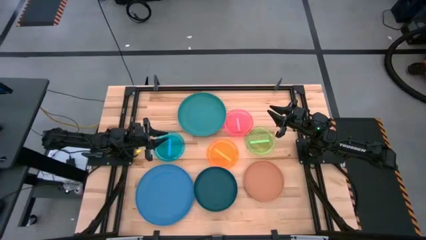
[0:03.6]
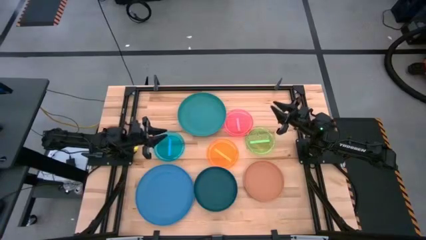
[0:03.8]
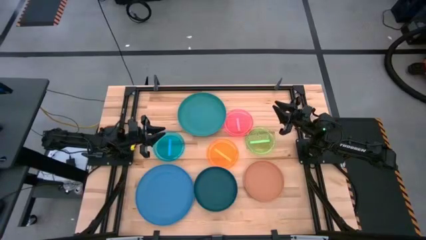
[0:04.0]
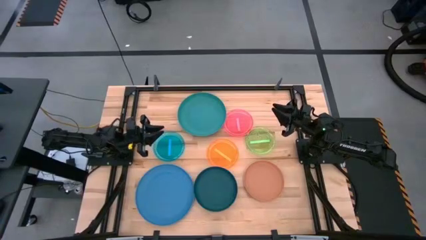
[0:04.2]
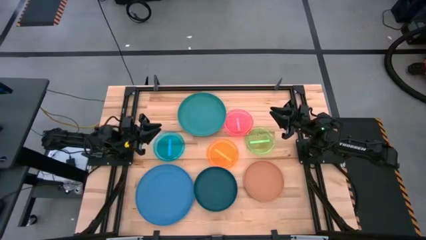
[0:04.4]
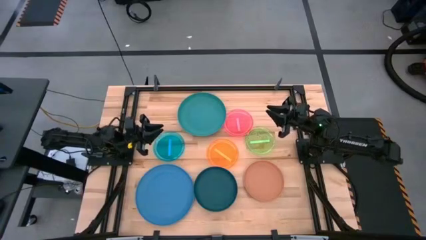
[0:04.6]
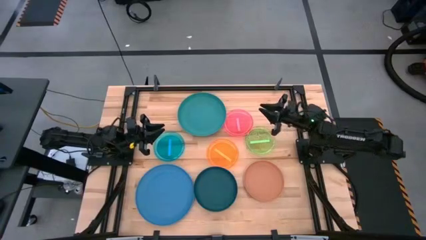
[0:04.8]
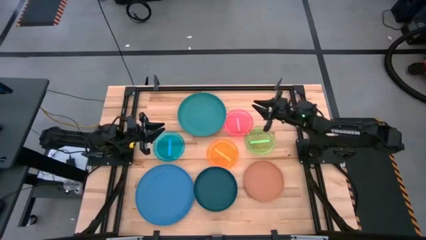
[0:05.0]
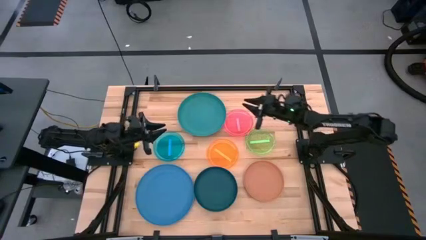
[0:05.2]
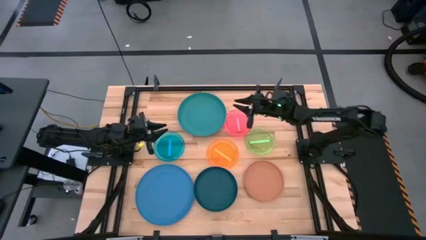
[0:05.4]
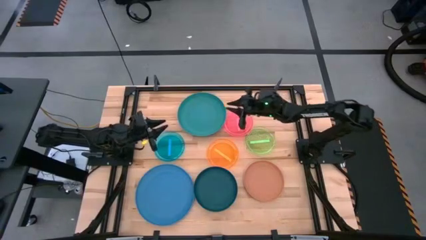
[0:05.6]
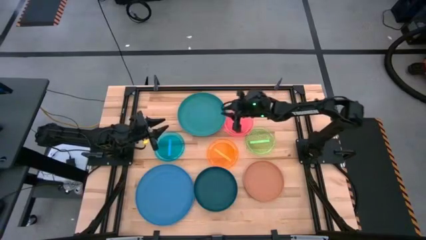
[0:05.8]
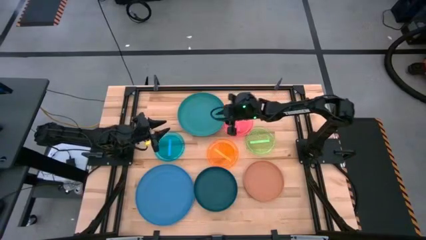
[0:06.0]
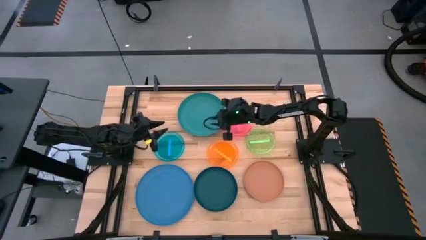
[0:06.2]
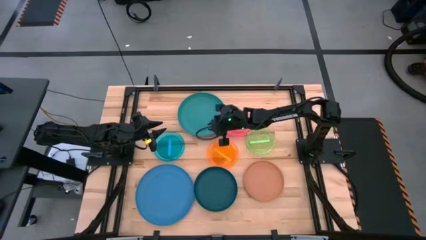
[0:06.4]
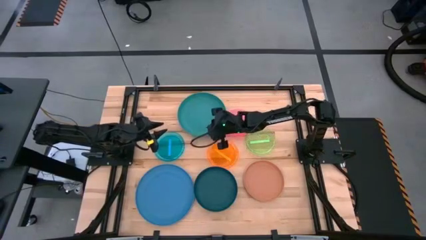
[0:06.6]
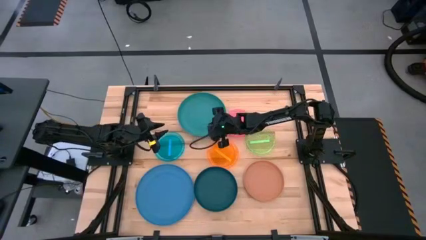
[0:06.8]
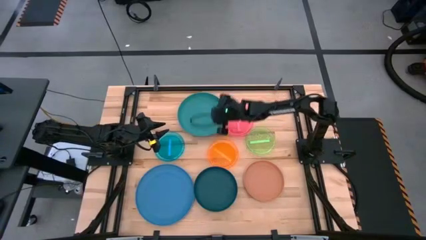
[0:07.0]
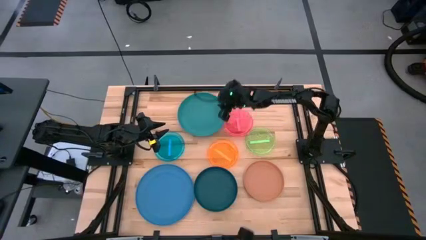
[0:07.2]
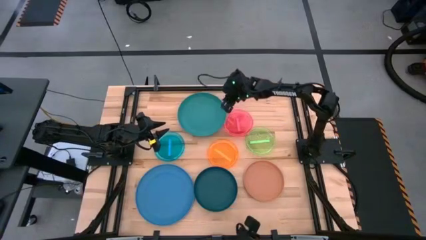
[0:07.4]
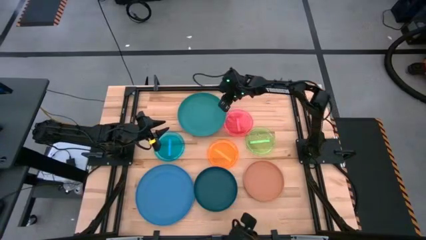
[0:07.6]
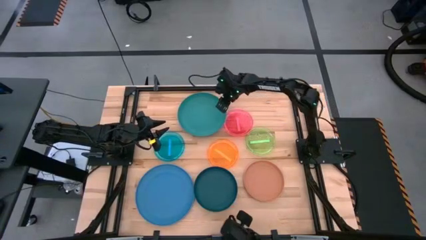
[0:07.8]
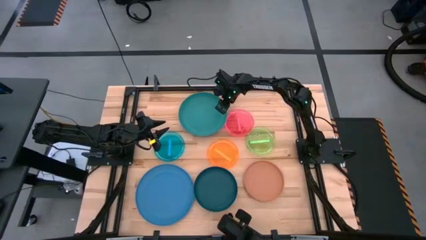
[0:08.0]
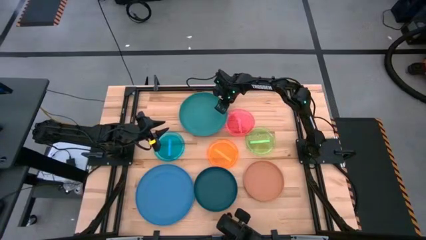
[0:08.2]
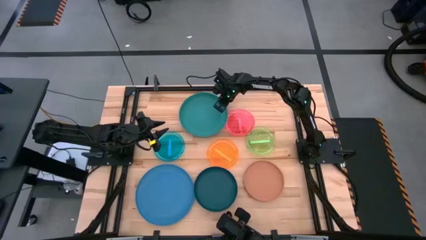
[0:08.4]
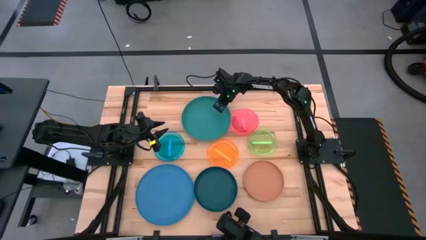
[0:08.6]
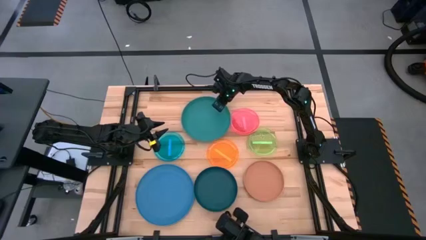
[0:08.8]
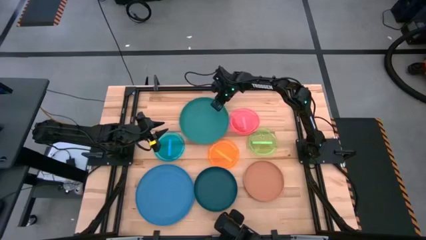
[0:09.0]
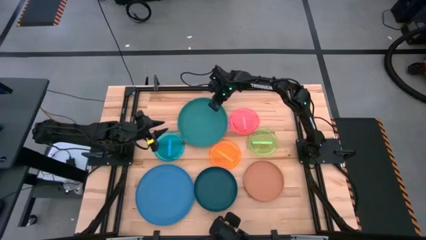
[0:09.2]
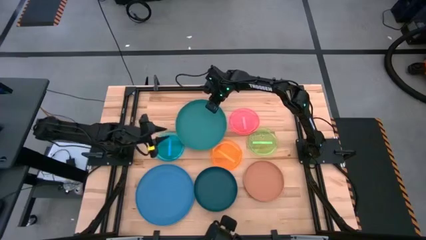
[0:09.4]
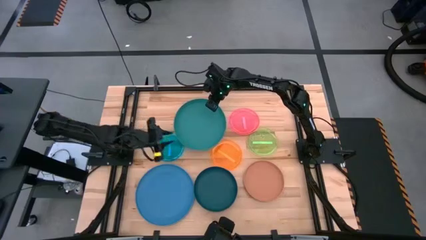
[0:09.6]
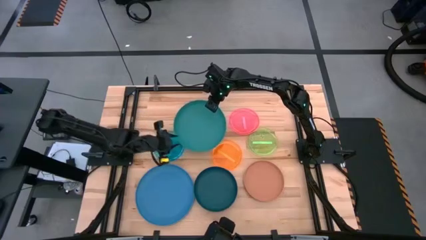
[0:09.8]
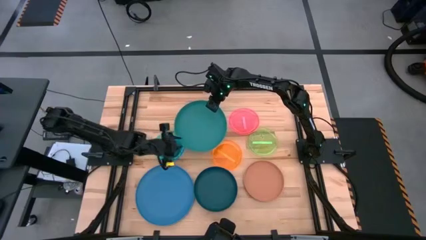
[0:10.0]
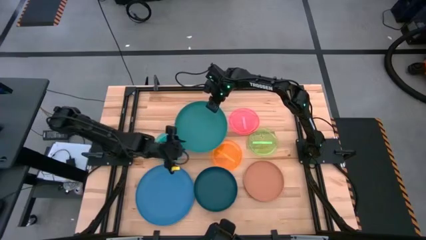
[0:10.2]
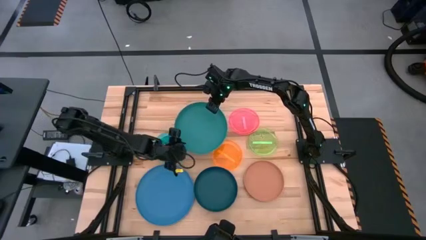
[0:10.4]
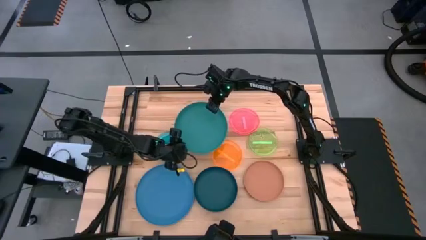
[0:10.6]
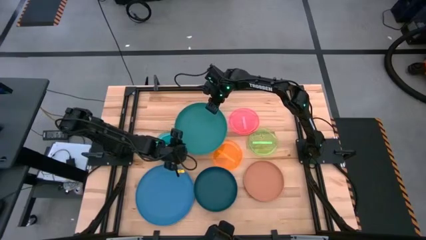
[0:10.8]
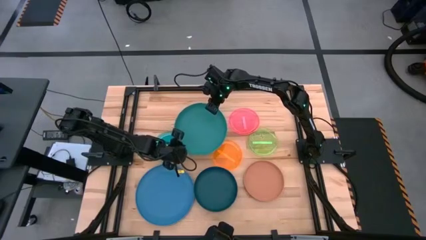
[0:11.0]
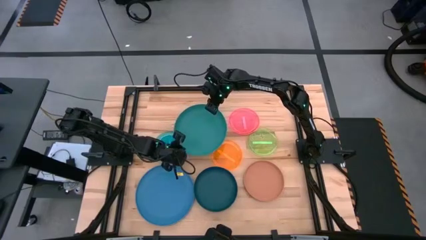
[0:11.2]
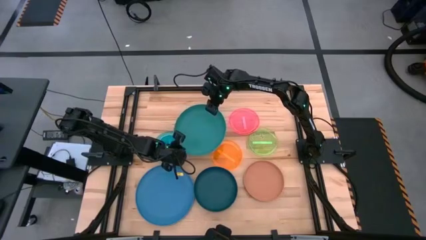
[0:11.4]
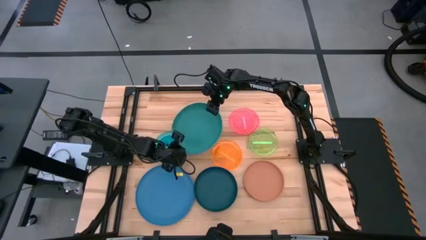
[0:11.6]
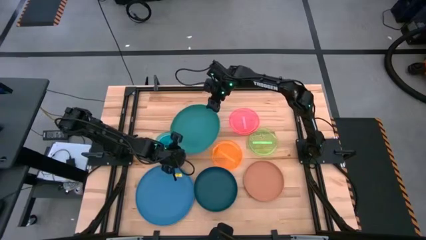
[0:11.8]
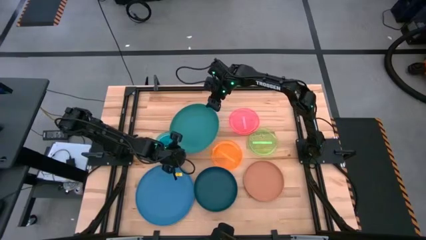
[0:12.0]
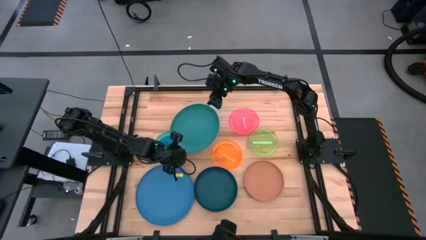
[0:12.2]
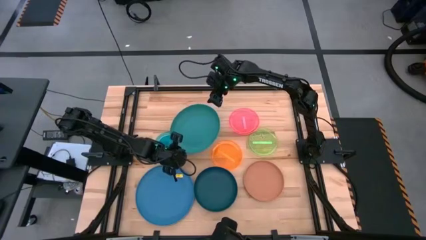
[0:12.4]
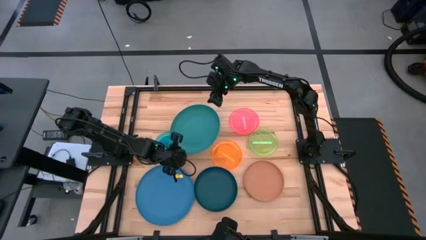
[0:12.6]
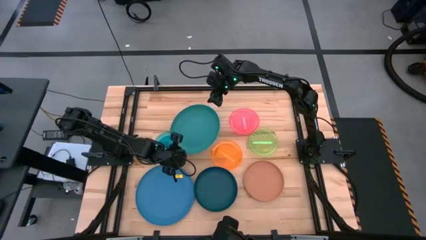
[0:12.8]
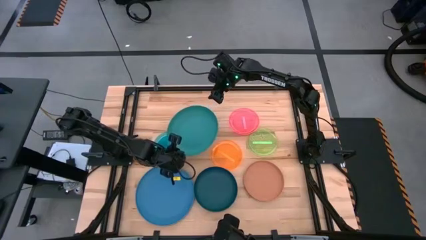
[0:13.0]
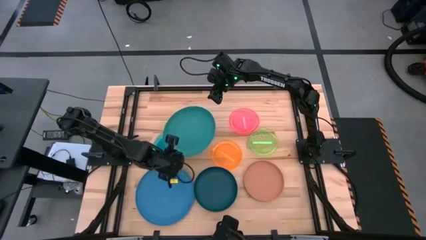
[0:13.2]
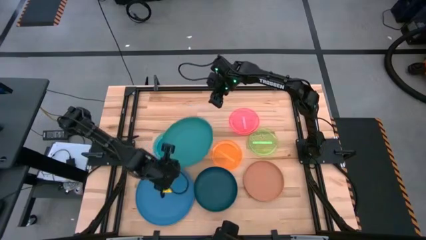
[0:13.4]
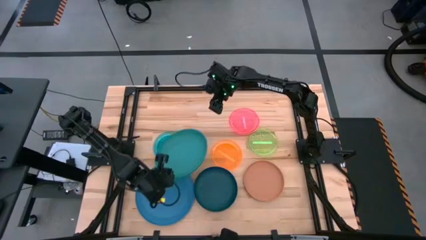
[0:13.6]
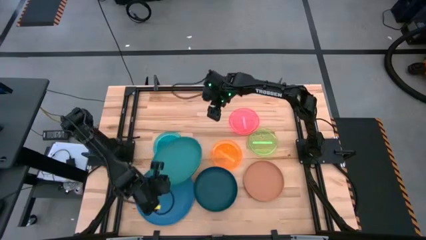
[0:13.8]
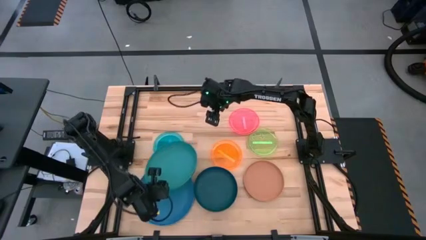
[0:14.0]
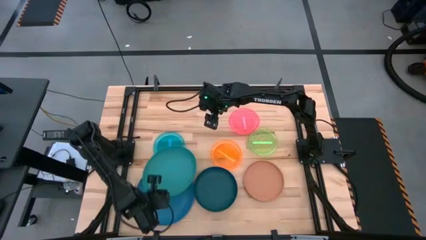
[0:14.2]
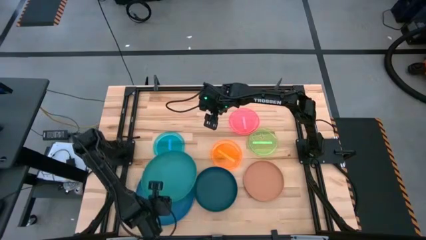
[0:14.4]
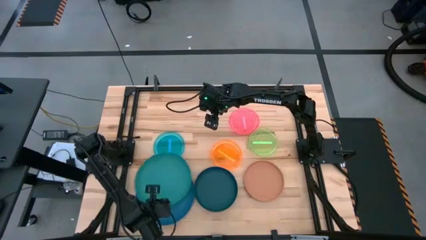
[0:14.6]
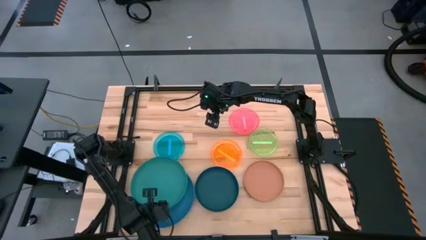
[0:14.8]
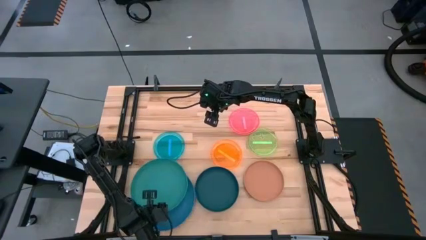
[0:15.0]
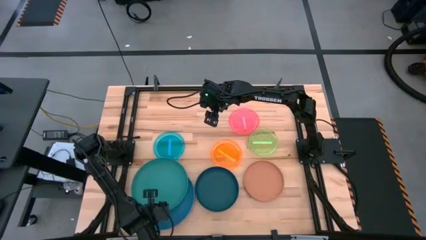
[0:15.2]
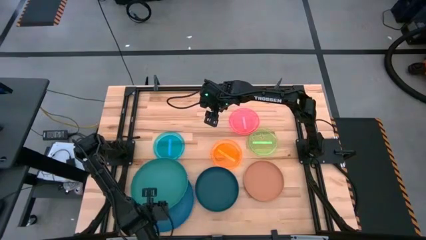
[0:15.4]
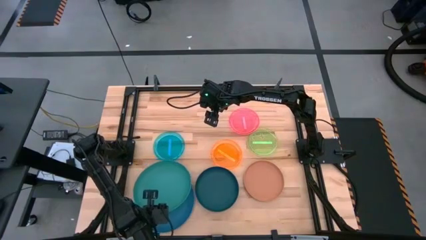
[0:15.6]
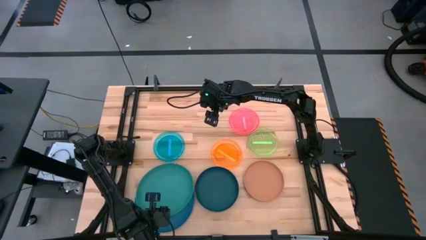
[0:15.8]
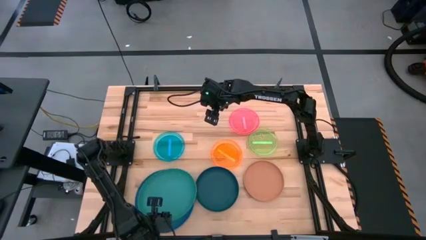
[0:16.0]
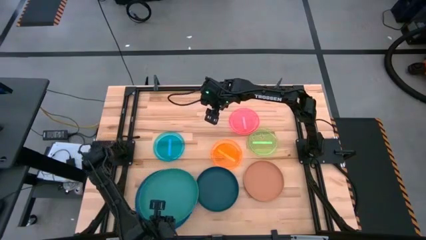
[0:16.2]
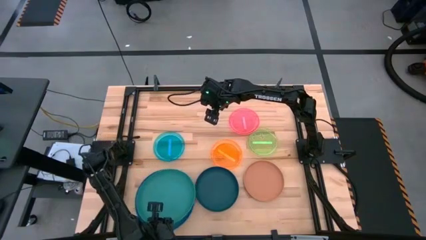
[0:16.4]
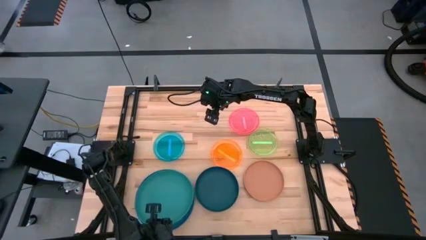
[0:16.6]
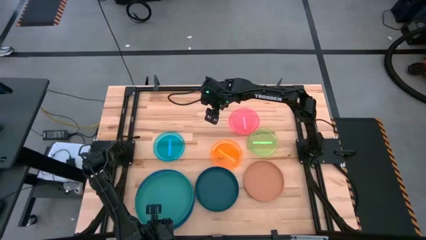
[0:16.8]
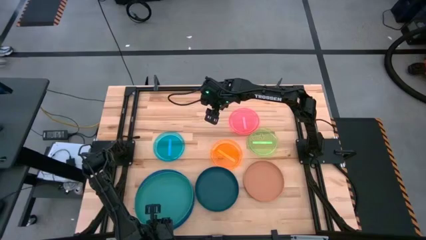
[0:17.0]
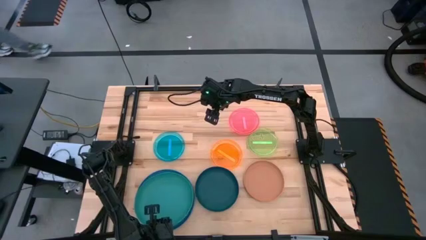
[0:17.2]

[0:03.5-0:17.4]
Task: Stack plastic plates
Stack the green plate on top of the blue plate
